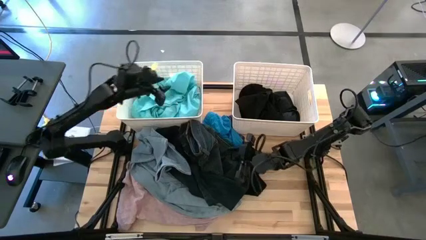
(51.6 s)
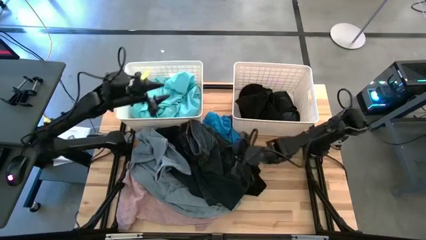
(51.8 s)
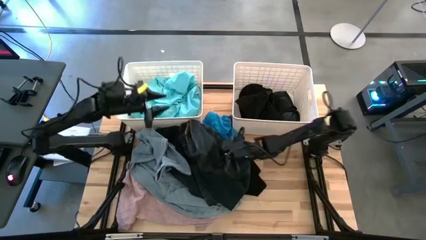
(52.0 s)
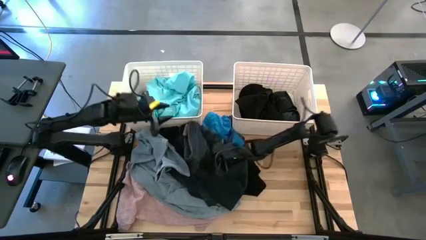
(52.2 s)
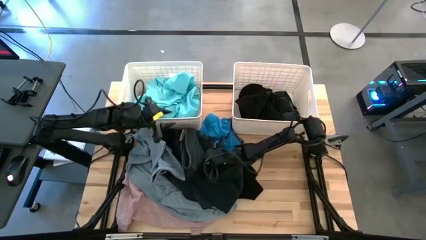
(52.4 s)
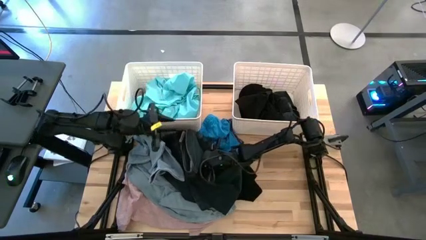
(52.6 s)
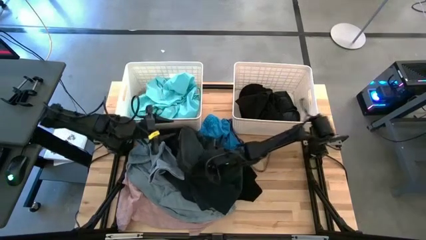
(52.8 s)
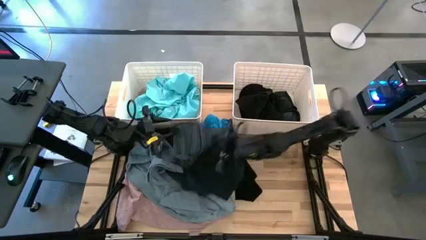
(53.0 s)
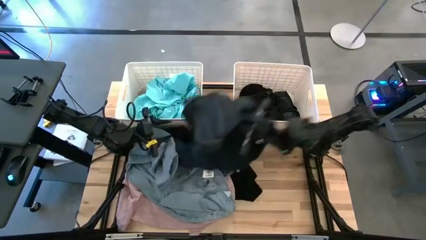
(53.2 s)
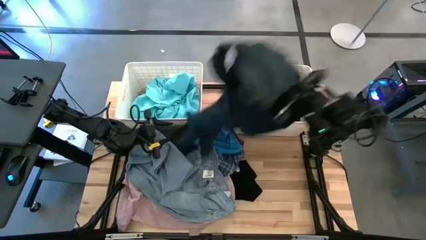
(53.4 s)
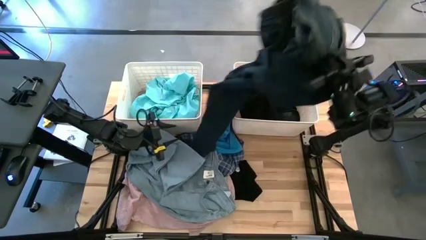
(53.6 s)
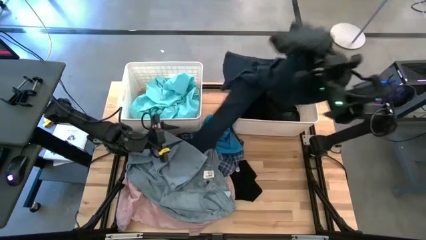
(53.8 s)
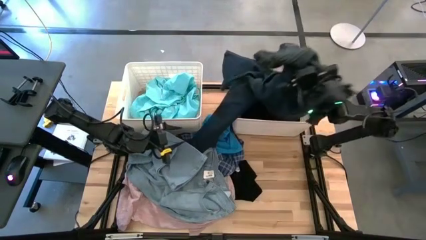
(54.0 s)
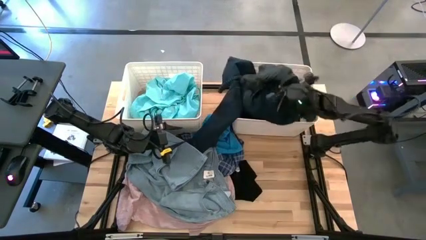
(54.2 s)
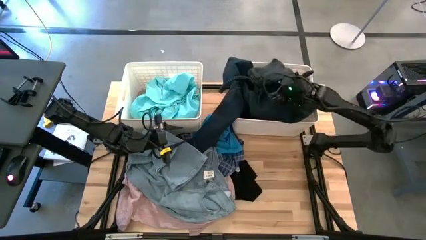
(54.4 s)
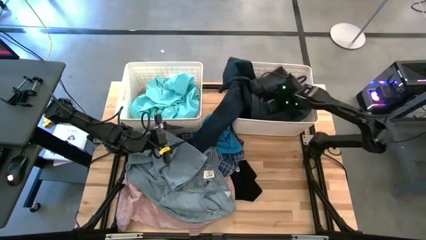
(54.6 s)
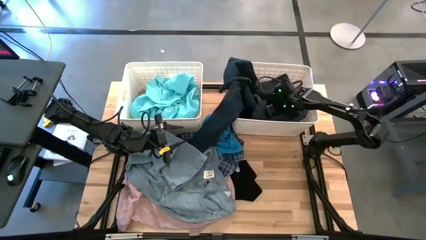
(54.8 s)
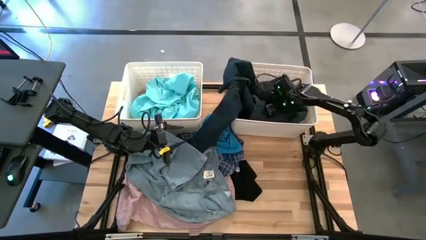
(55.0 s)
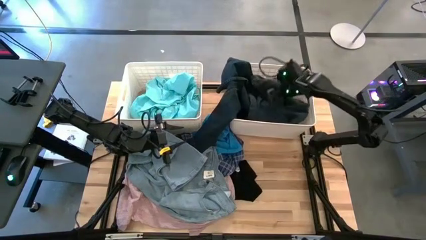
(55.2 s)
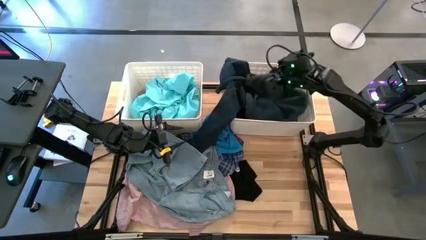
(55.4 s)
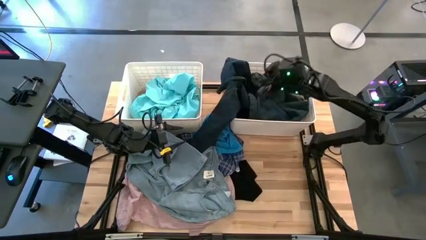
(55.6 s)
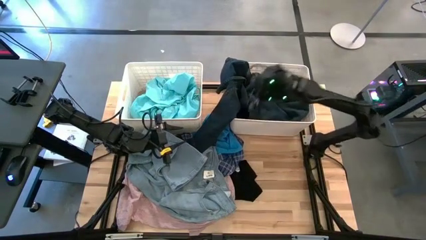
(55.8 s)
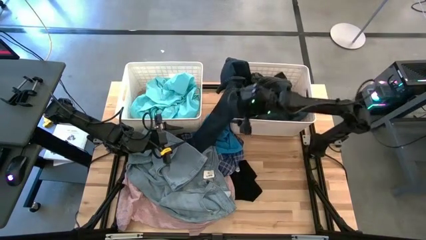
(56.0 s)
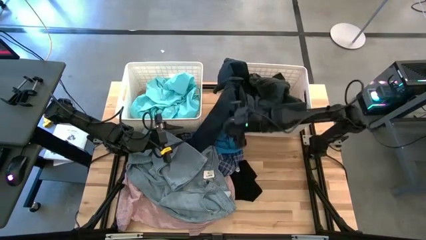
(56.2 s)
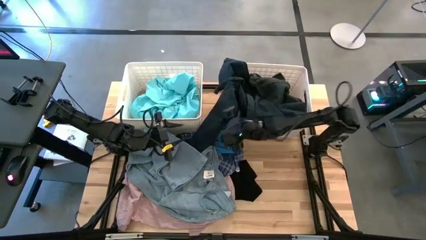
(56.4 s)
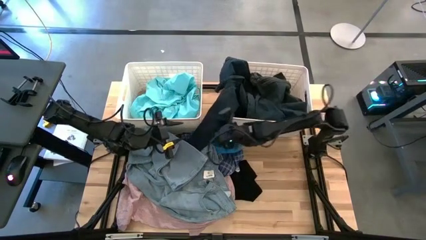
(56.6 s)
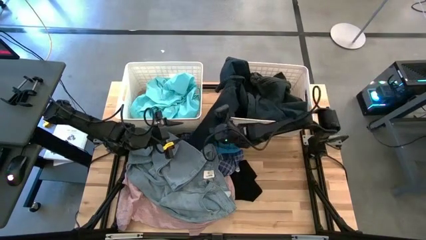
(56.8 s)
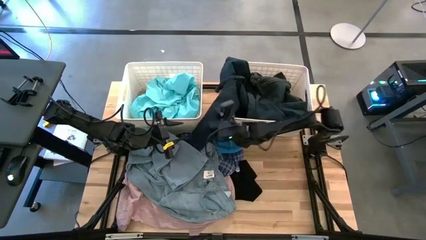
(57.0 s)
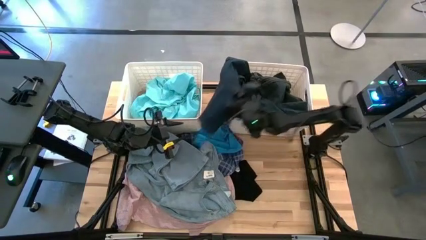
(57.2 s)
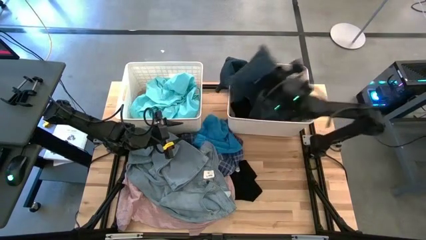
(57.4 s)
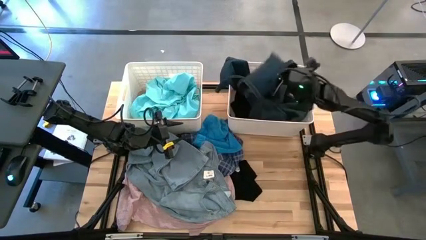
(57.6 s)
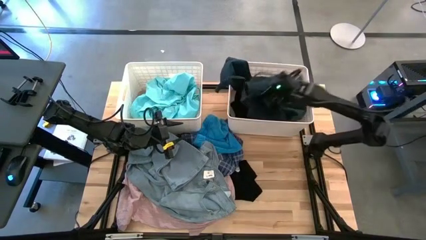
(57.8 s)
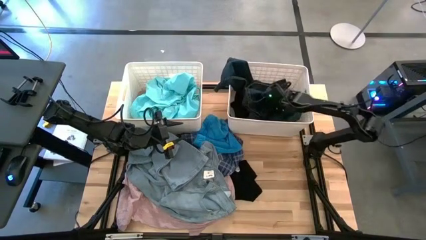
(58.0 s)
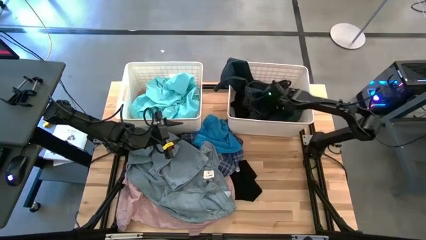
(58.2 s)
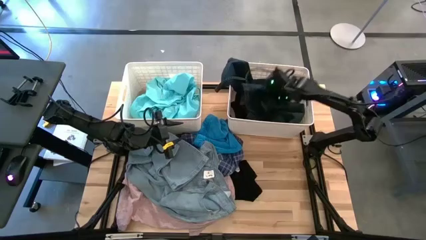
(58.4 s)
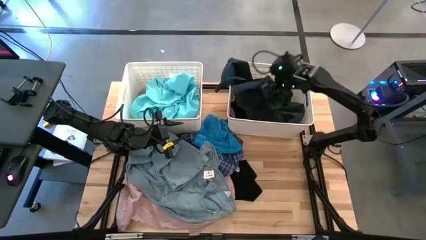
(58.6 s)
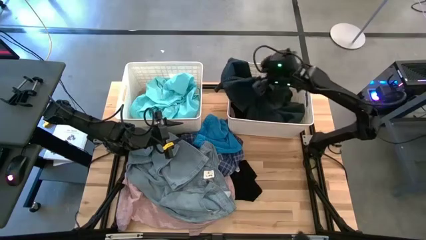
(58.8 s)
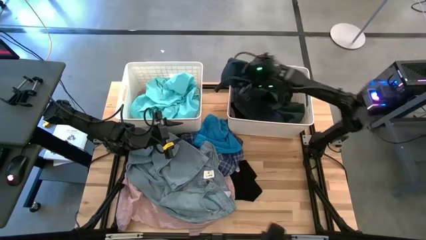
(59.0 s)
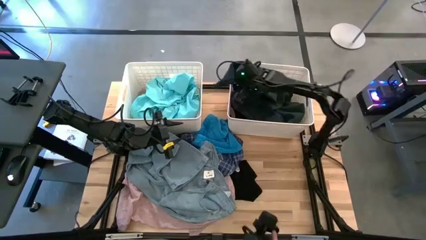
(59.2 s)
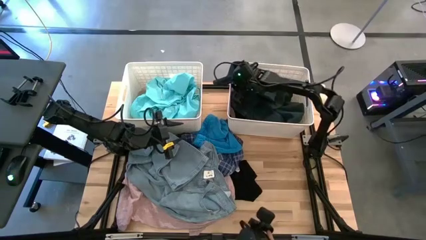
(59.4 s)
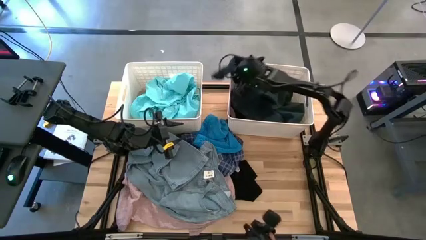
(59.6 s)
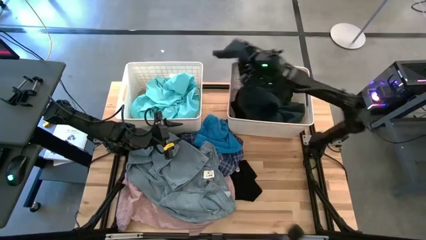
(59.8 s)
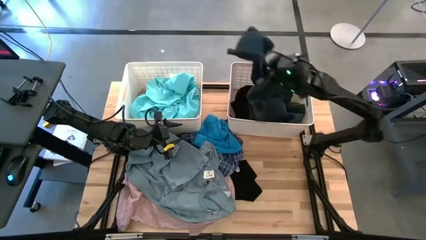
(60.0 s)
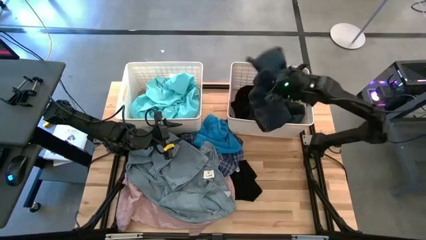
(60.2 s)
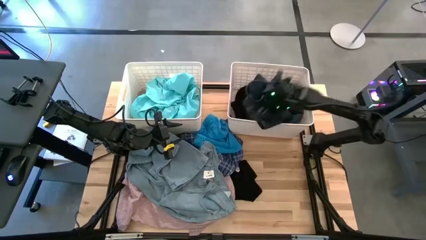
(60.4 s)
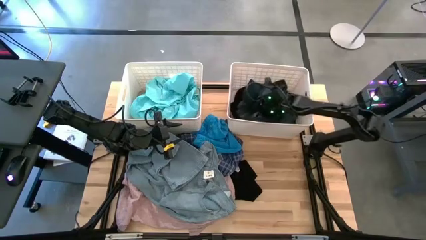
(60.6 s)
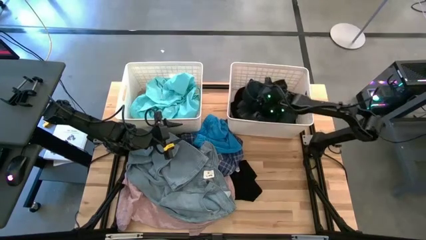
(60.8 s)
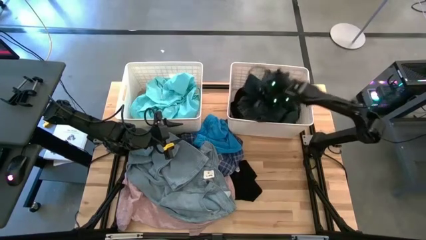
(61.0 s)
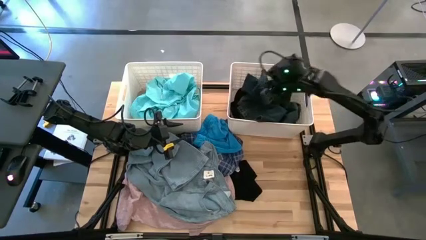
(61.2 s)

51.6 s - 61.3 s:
Task: Sort clothes
Put the black denim pants into the right white bin

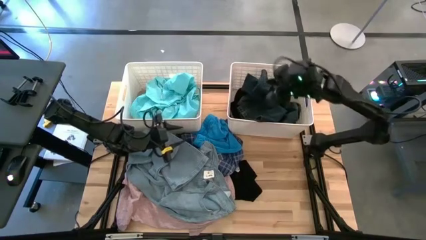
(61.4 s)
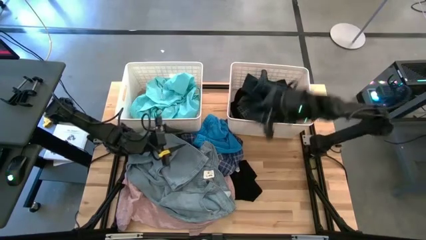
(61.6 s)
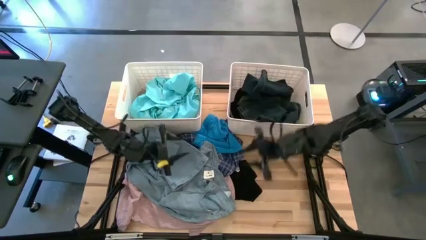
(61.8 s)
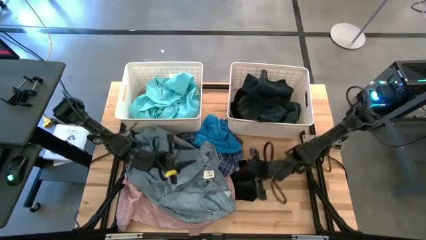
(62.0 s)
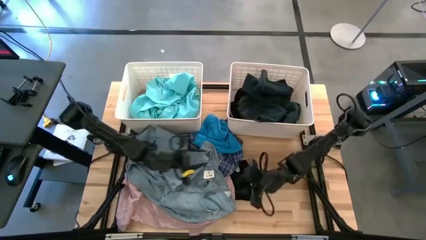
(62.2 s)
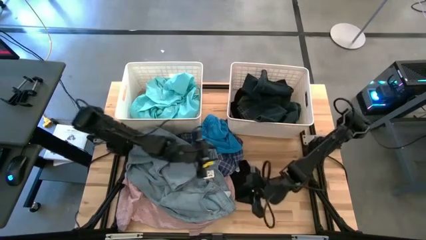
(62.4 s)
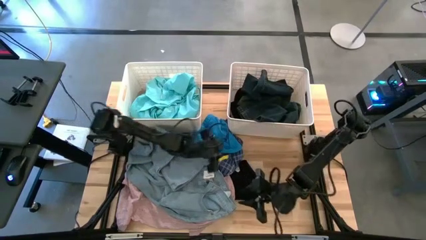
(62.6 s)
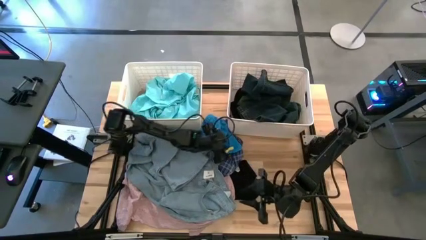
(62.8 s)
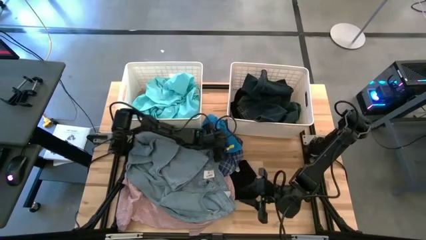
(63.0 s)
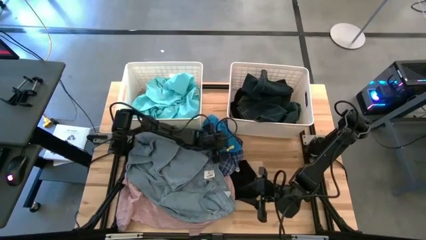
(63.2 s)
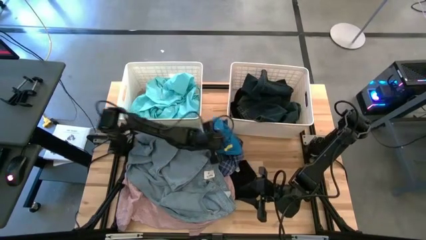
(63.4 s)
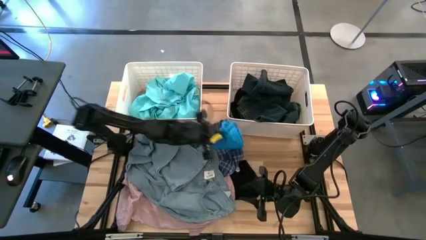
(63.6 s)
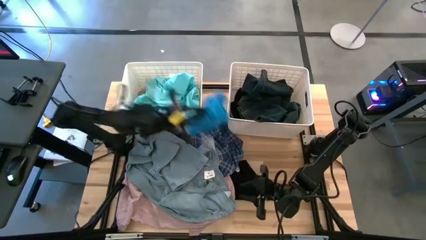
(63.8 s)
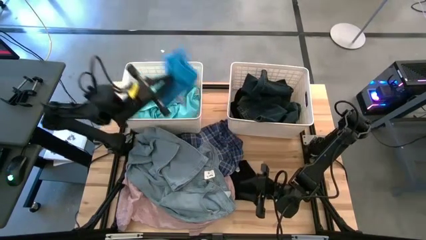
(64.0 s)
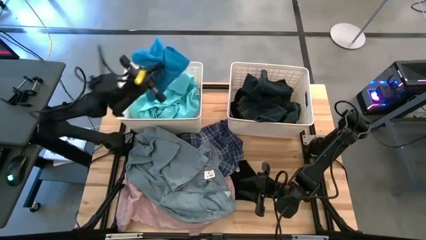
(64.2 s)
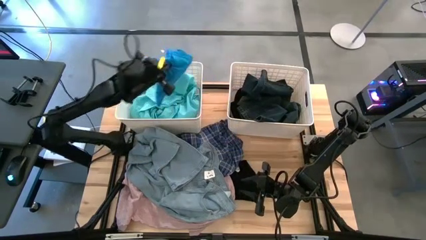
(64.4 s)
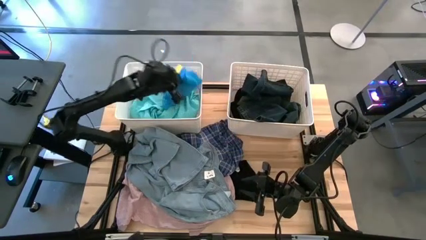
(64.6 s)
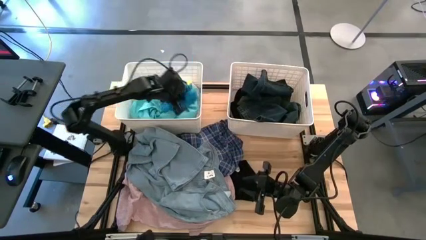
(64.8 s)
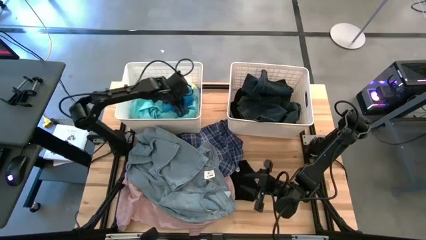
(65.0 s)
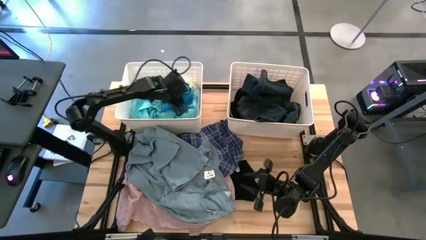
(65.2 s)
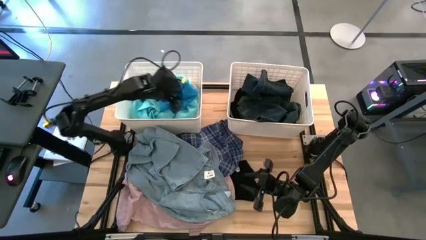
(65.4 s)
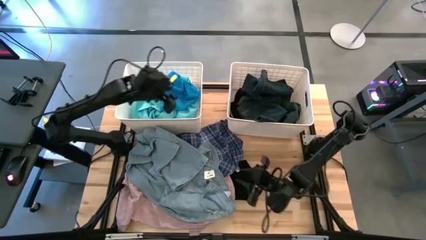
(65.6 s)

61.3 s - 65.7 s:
Put the blue shorts into the left white bin

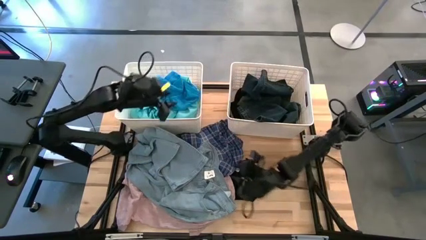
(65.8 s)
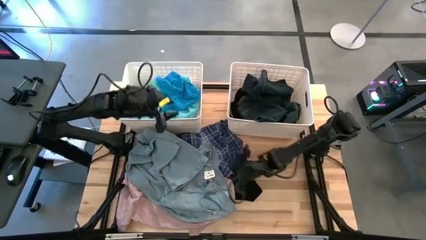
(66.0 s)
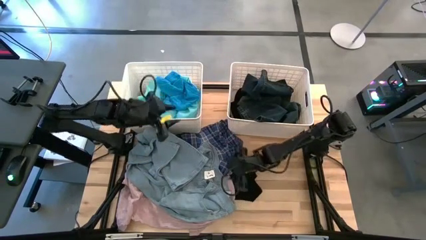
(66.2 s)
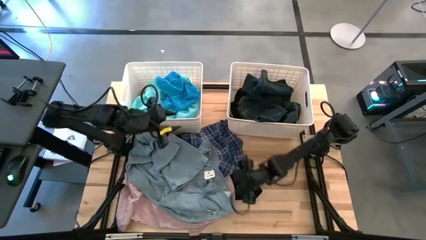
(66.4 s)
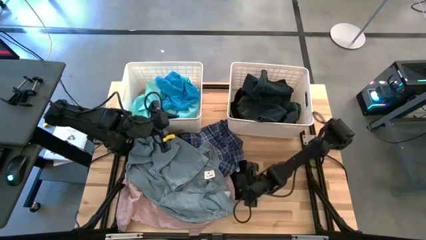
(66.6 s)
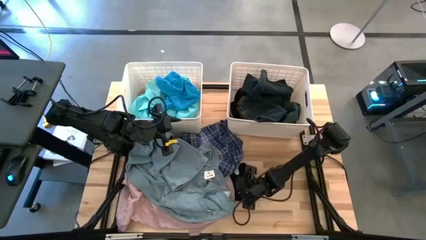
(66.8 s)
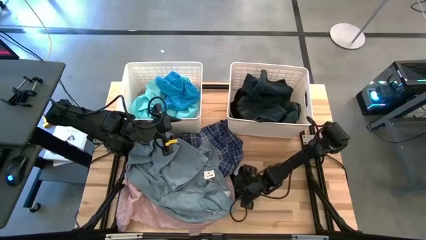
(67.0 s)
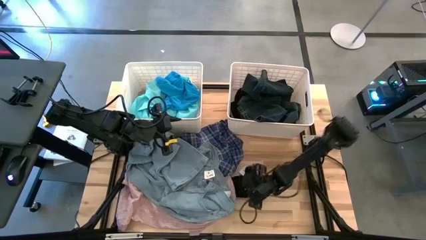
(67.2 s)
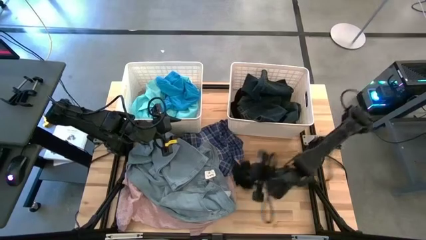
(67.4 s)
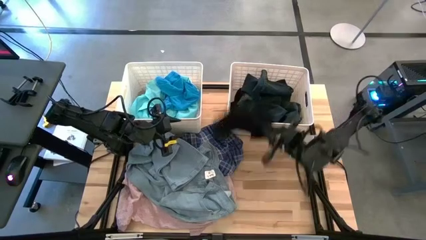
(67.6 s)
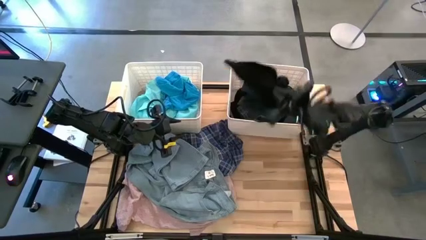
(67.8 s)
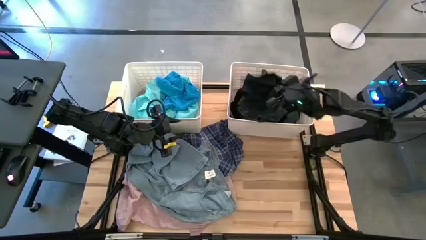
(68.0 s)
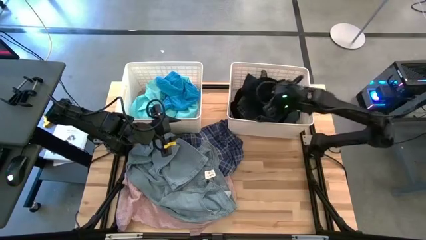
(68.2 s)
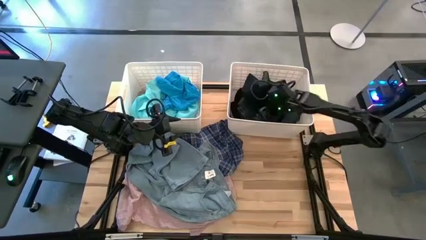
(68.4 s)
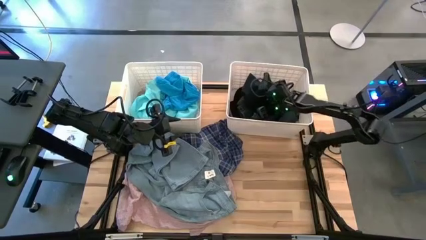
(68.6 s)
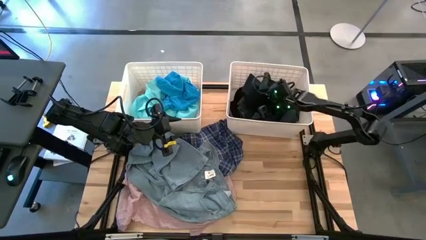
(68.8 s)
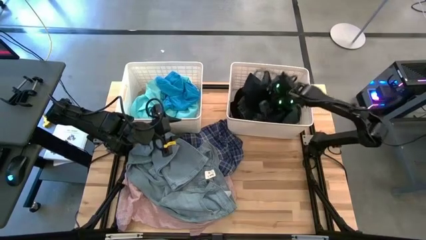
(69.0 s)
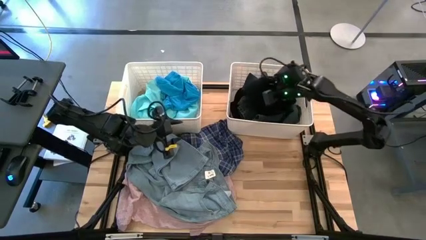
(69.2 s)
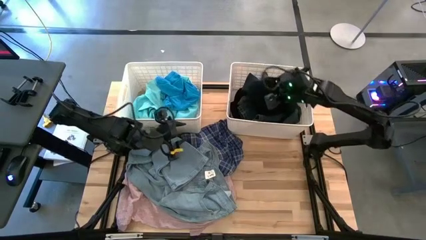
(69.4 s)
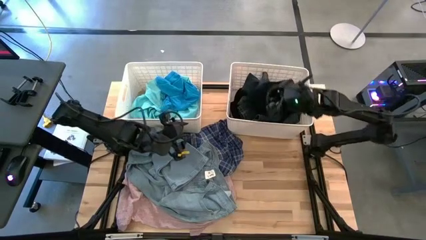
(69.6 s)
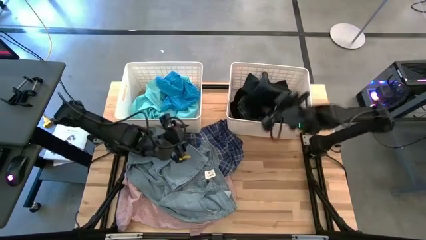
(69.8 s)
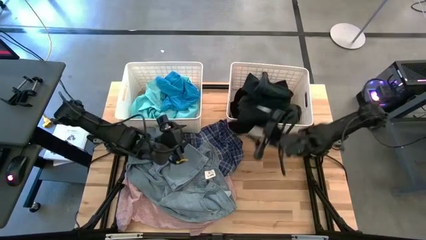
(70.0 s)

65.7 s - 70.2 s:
Put the black boxer into the right white bin
